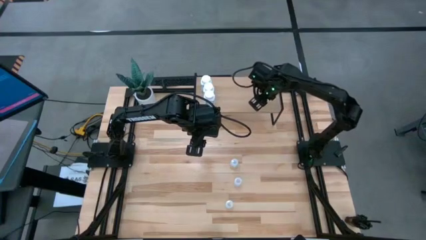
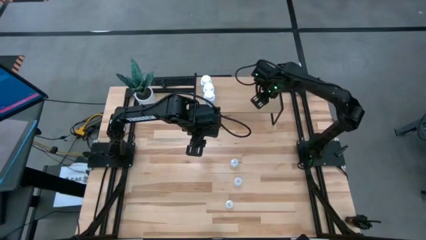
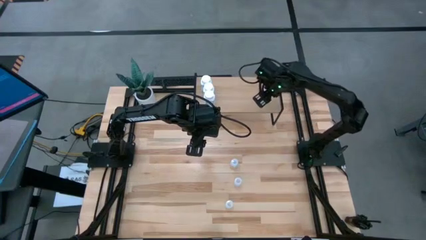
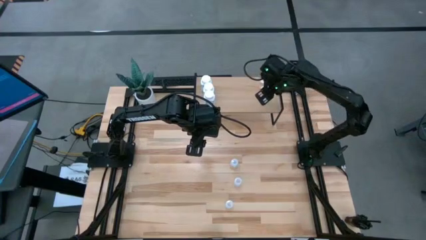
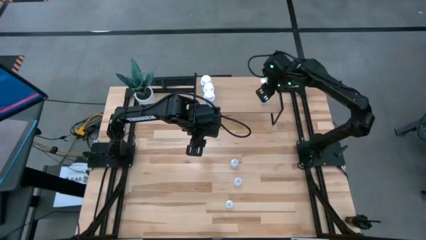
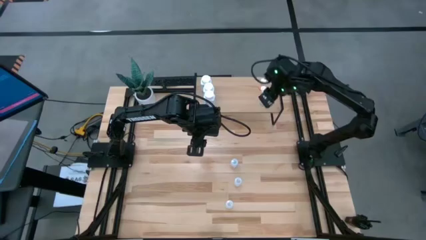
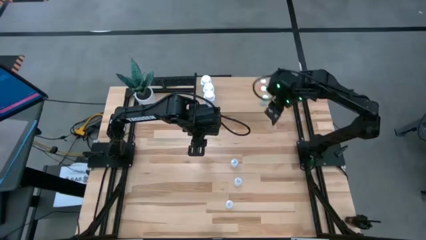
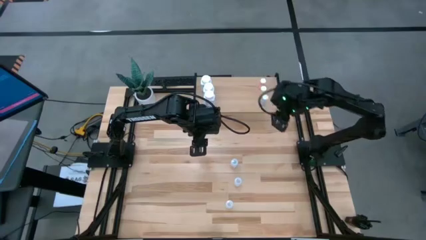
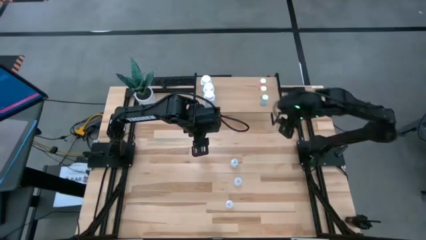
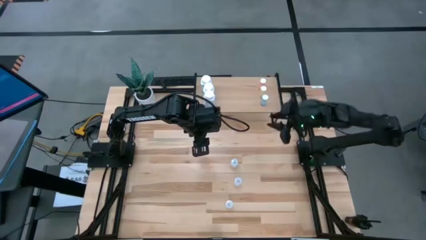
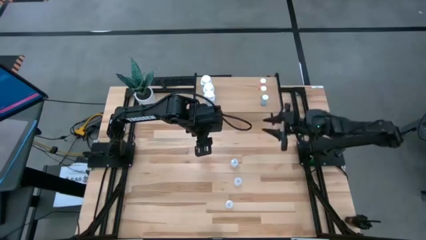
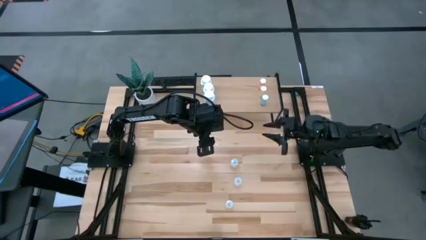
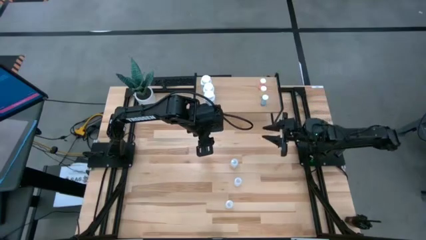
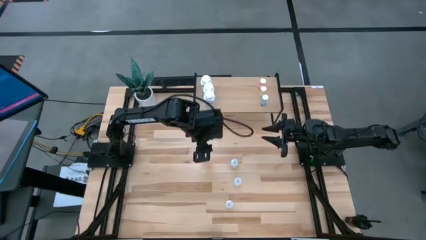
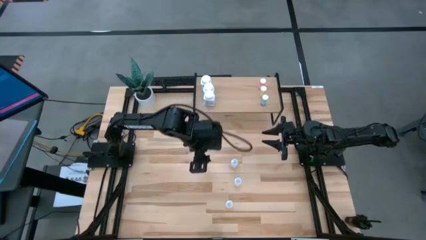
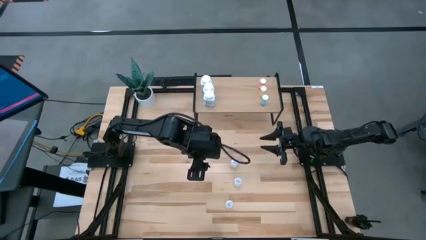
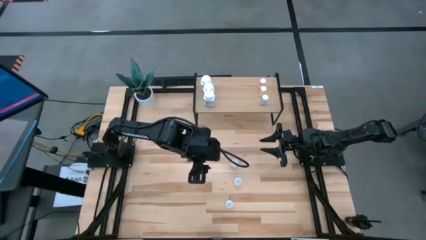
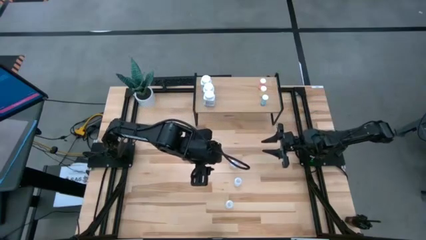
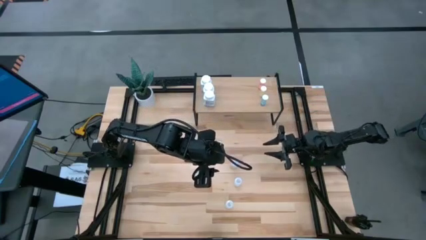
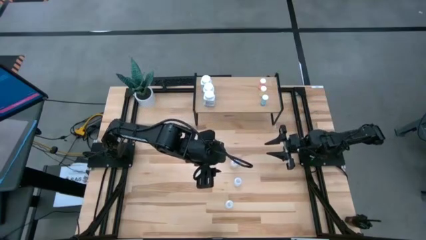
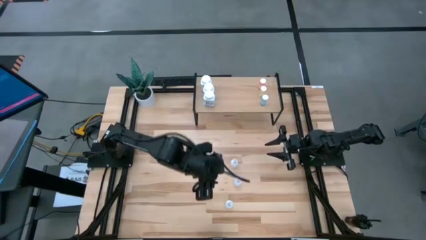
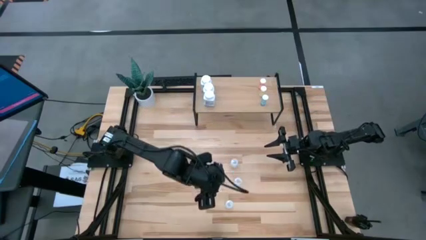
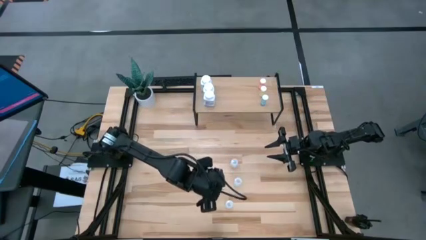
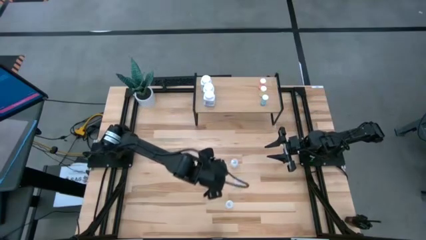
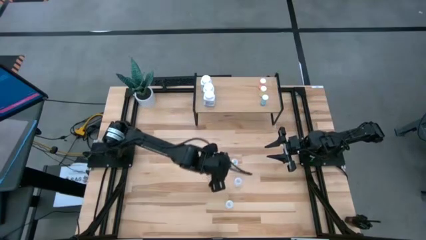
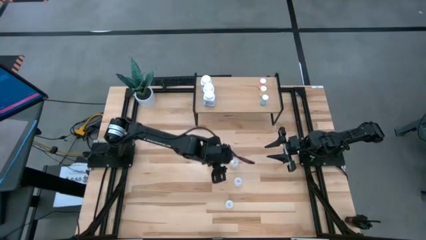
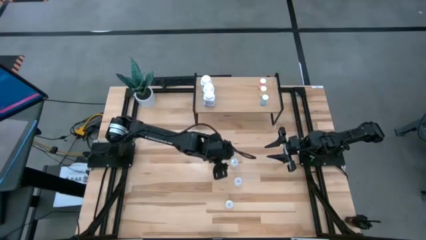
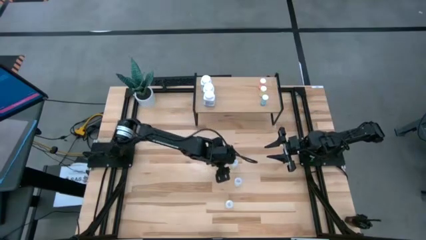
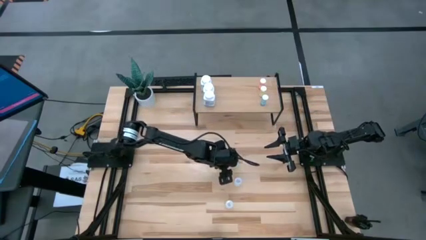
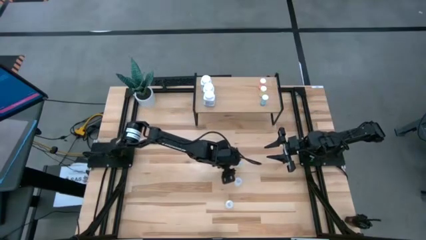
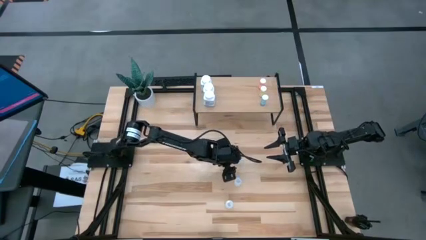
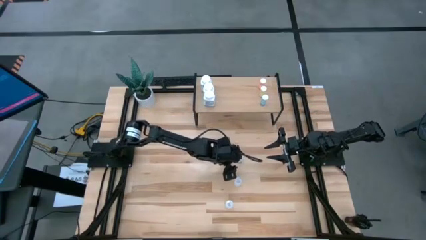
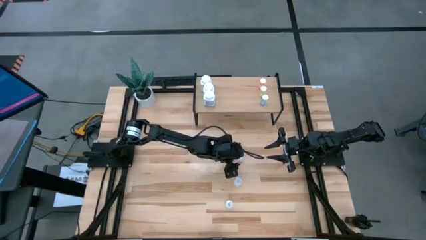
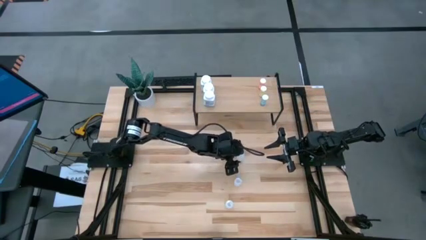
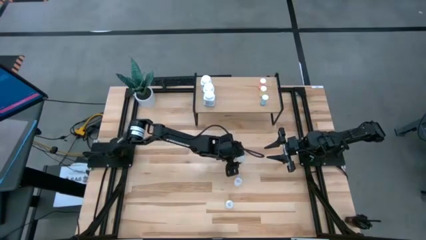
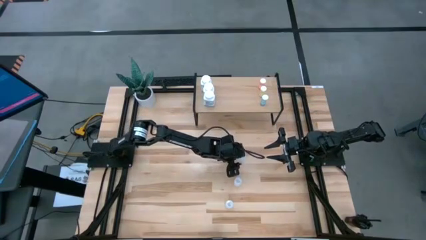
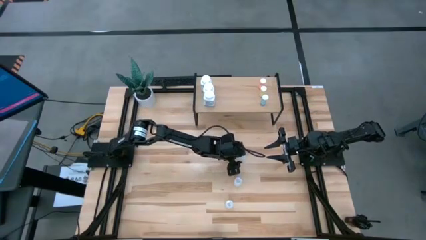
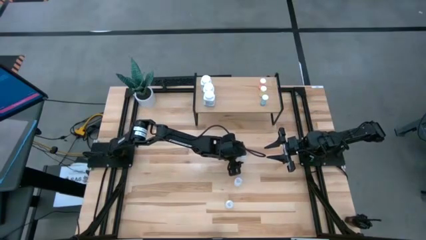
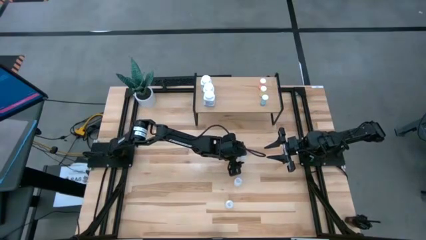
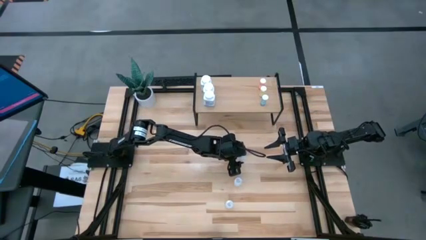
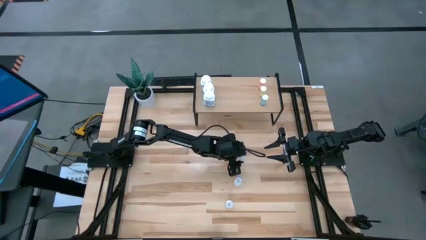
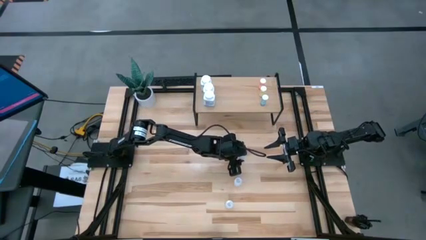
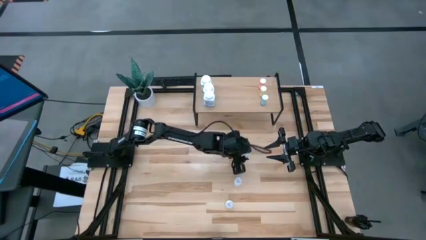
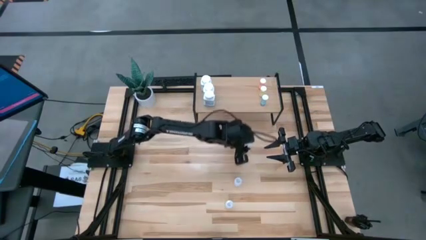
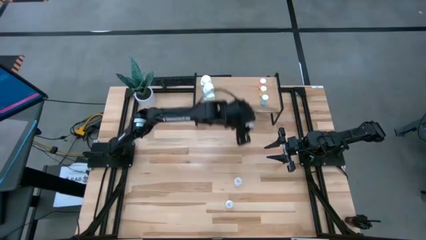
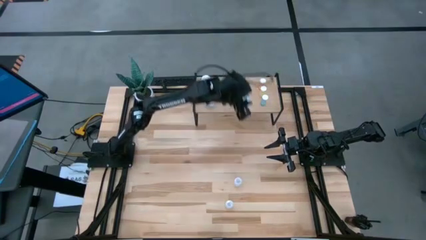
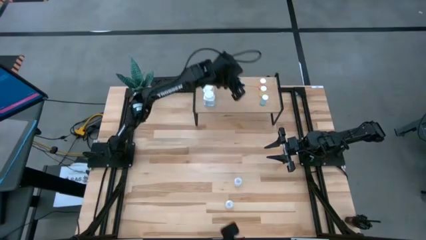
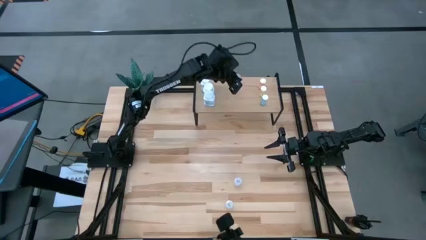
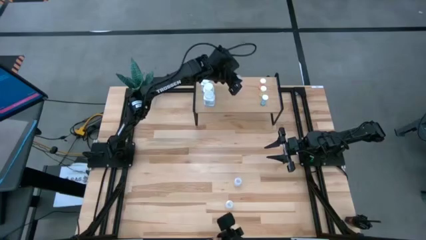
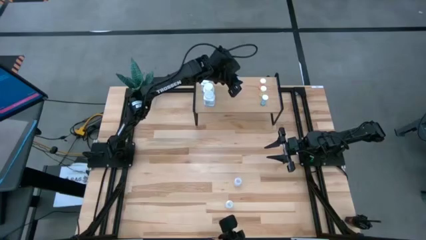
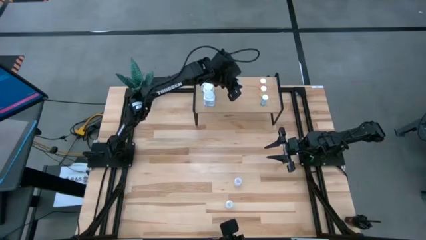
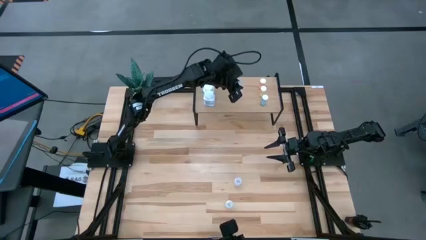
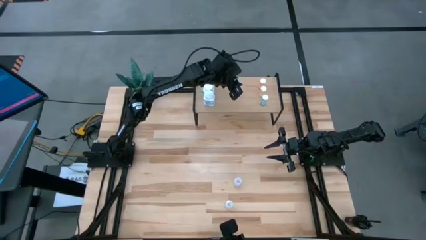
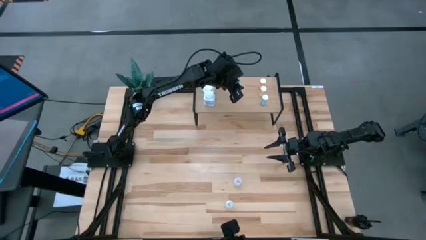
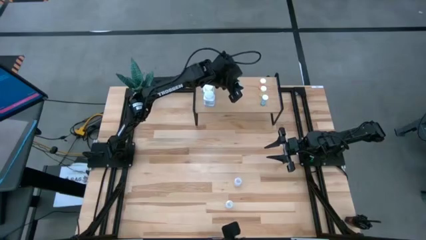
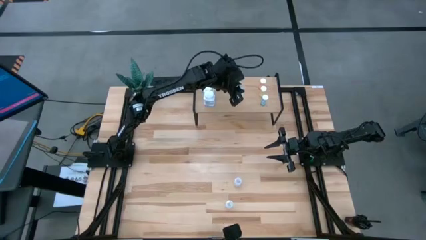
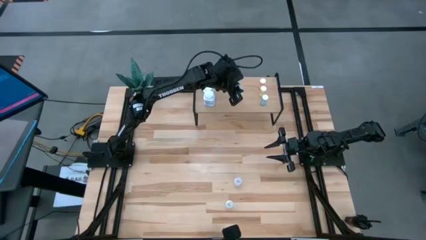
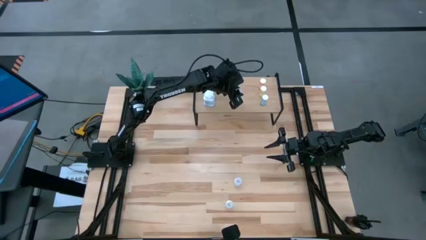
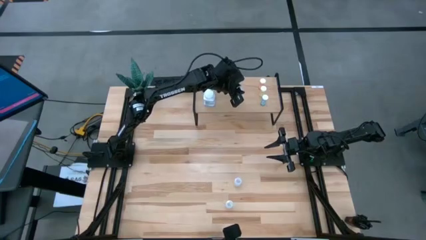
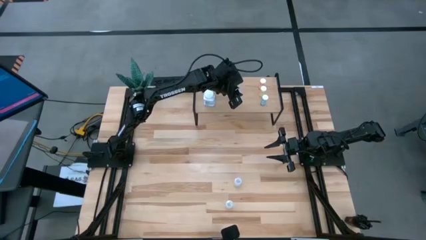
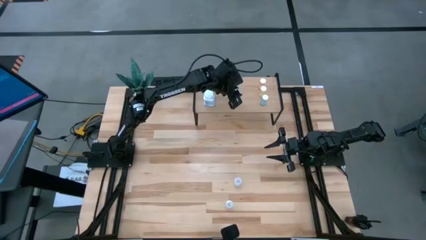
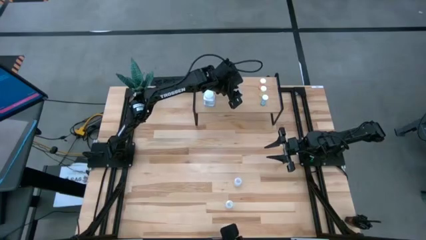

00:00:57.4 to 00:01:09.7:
Task: Pick and place medicine bottles onto shelf by color
Put the top transparent pill bottle aligned with the other transparent pill bottle on the shelf

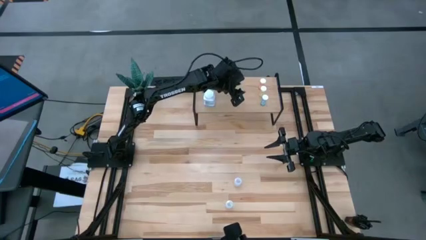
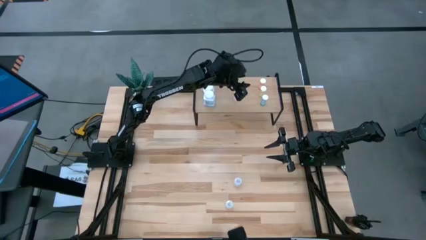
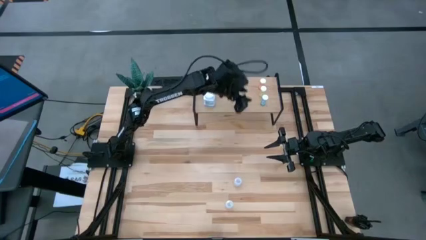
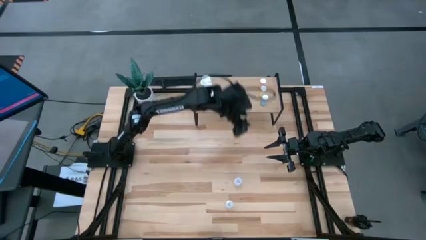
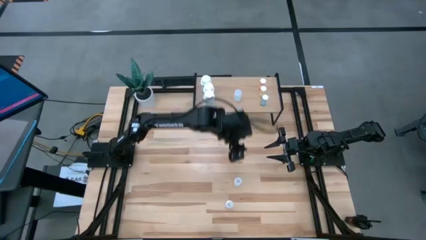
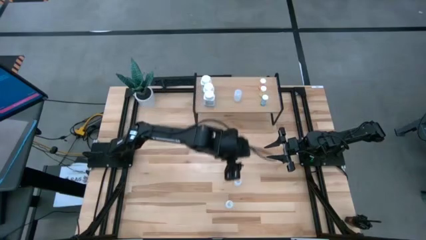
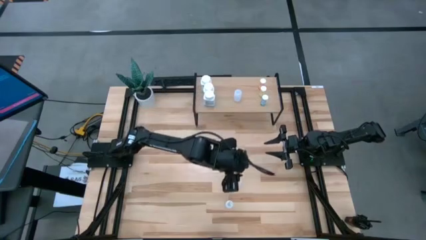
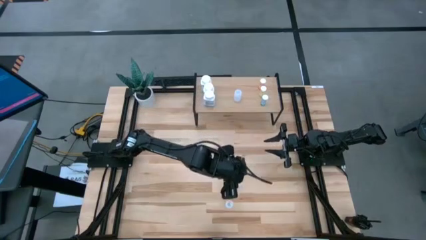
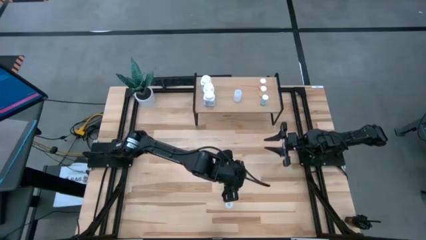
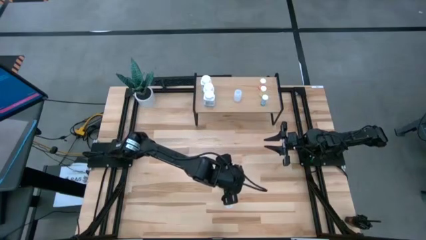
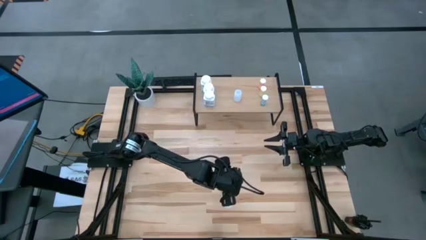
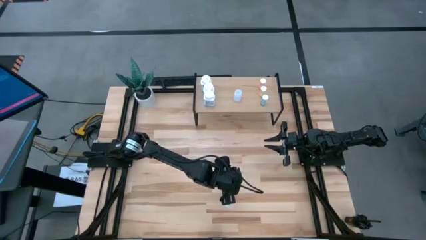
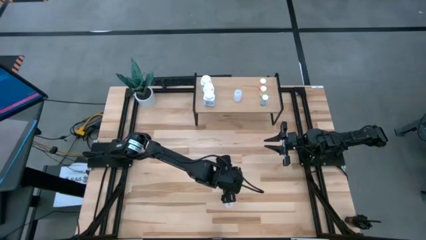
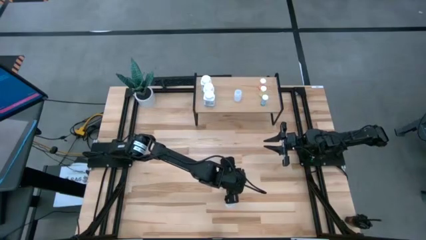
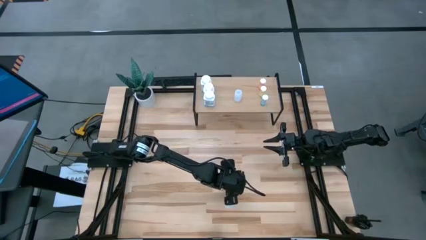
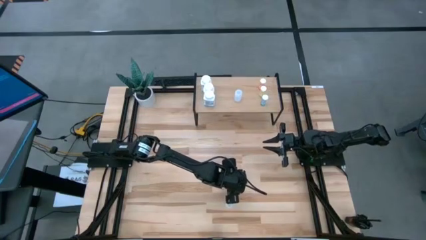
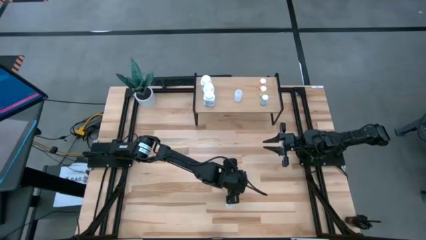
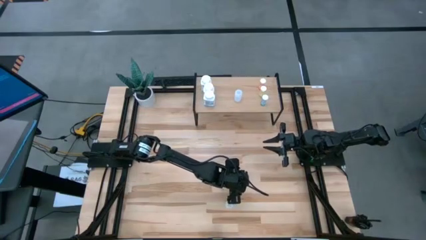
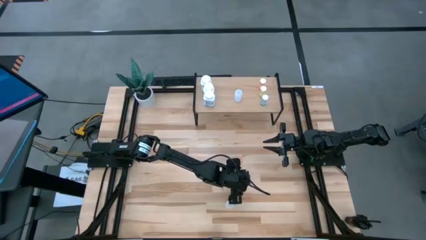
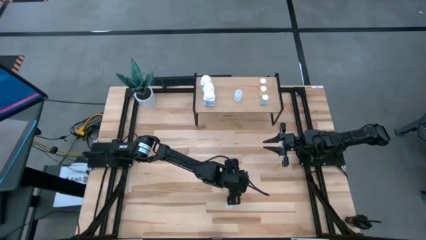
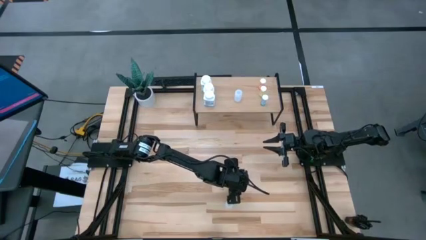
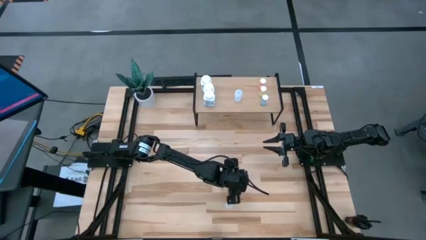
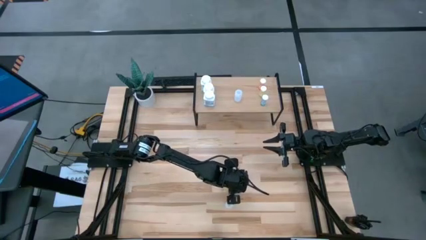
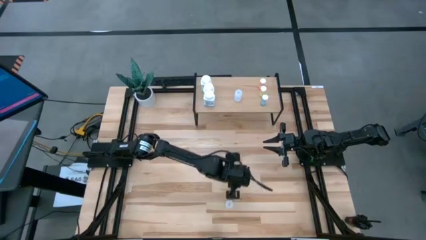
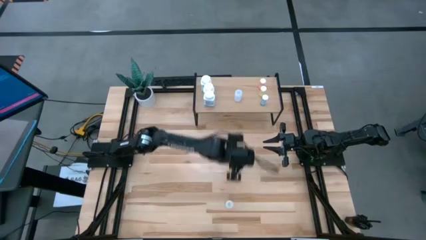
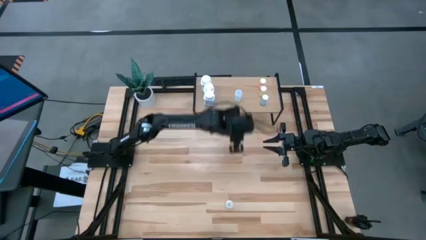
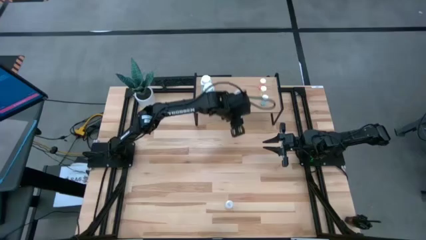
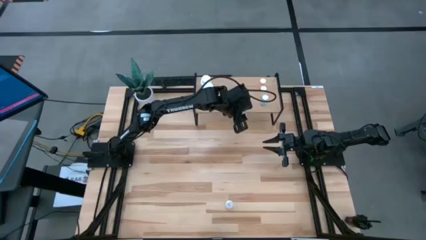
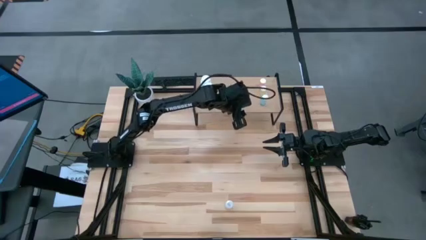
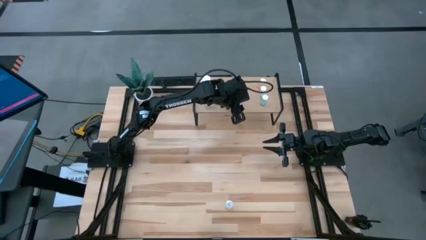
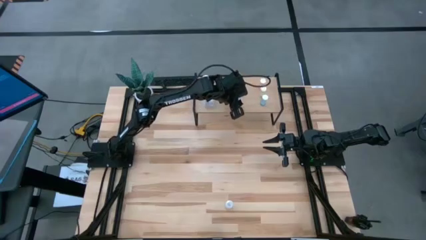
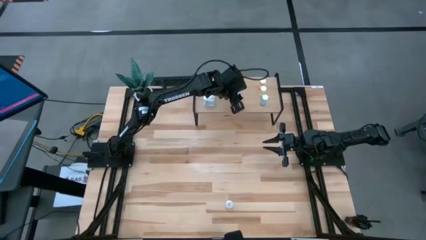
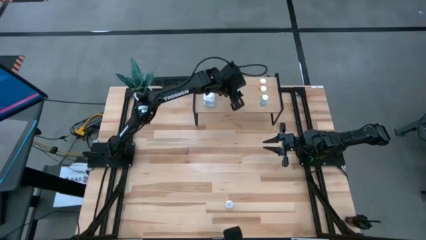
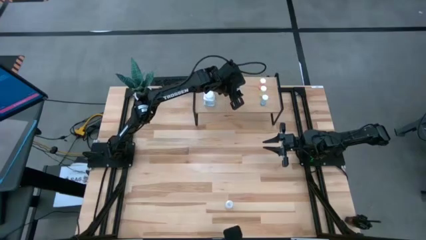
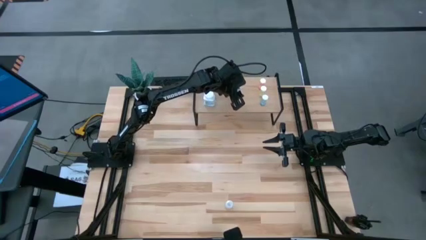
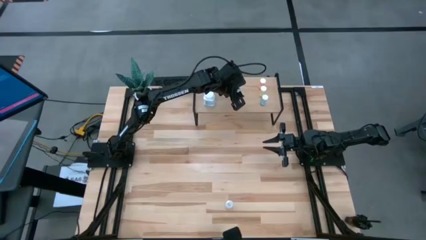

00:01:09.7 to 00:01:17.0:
Put the top transparent pill bottle aligned with the other transparent pill bottle on the shelf
